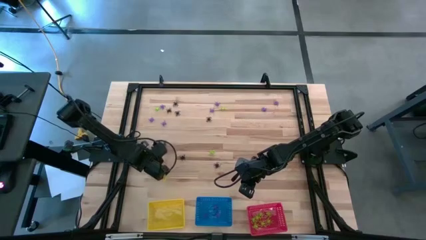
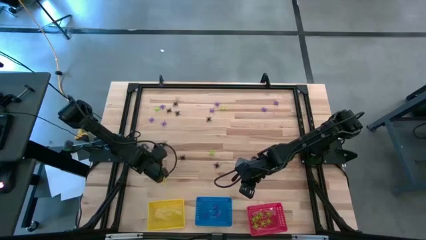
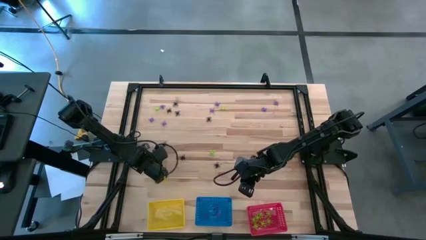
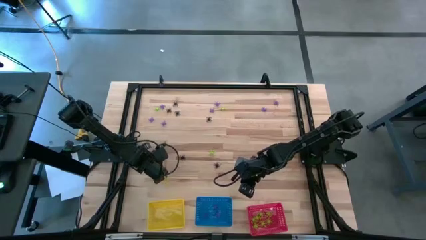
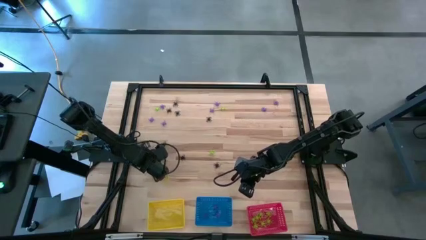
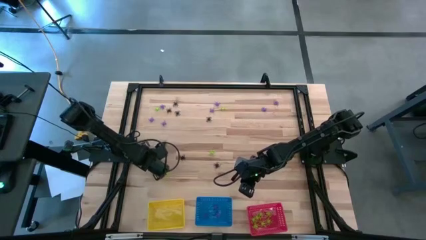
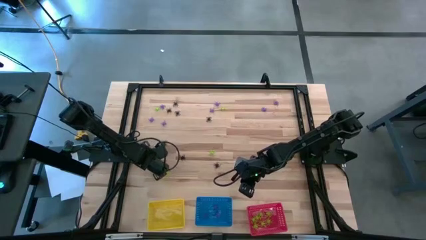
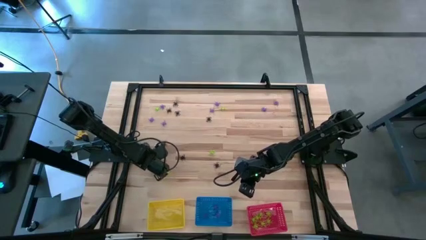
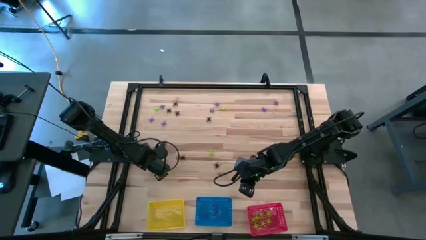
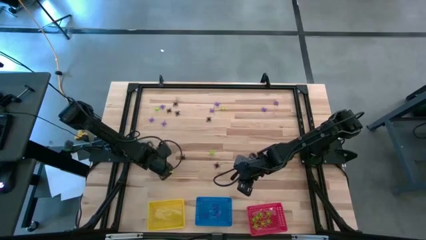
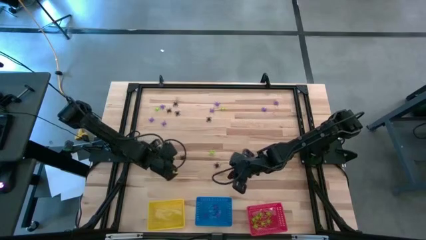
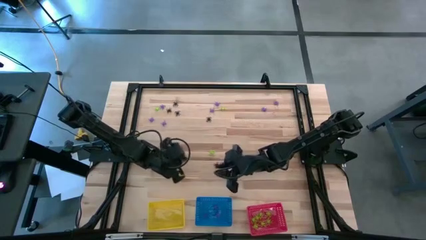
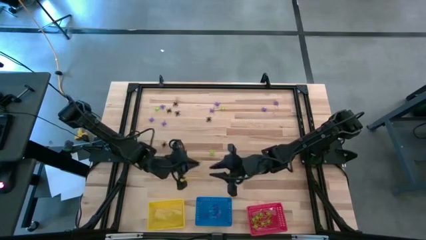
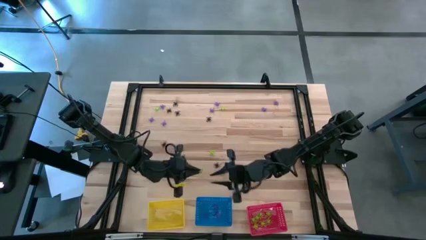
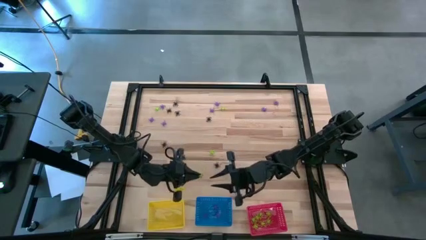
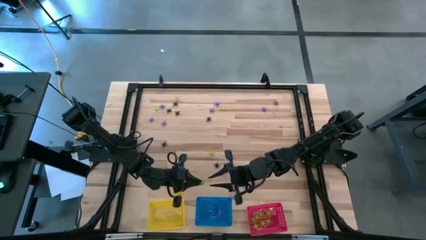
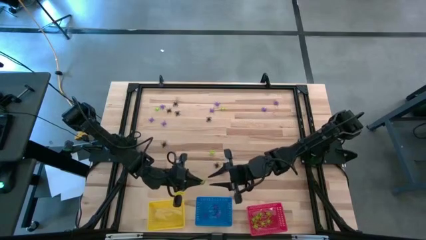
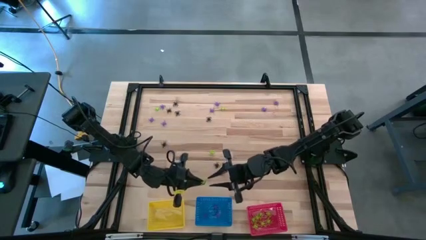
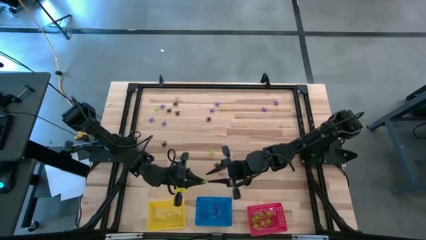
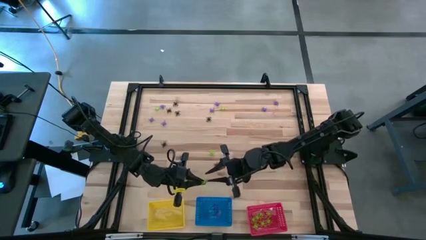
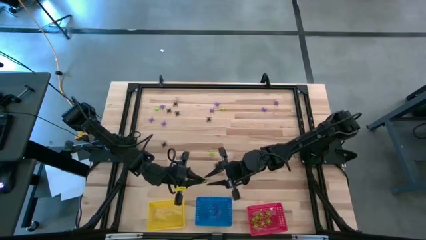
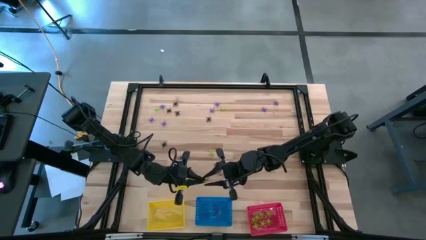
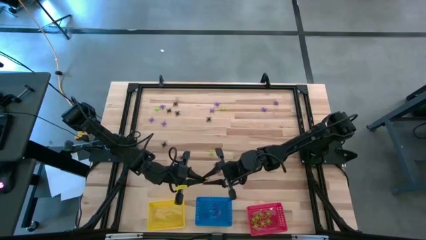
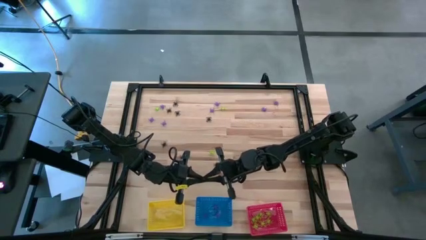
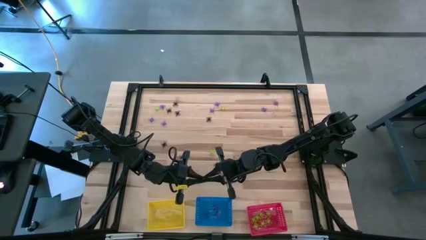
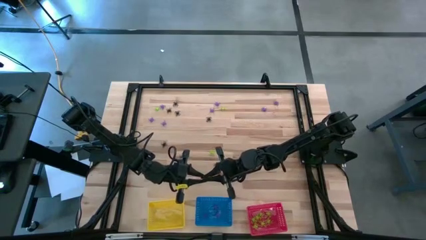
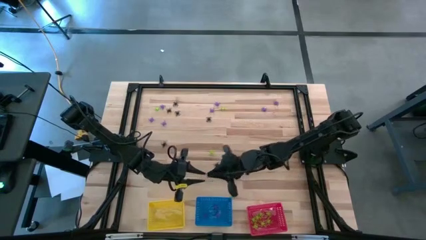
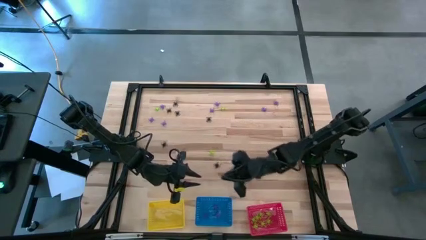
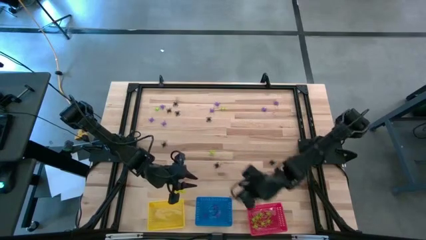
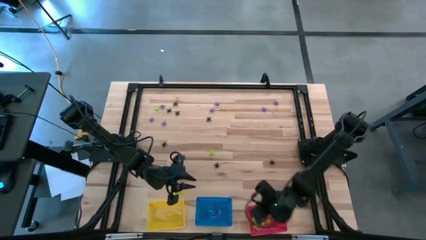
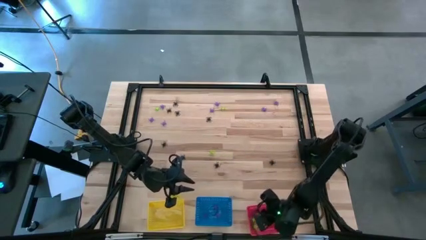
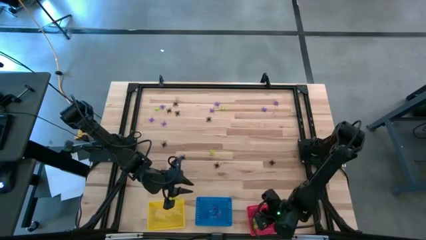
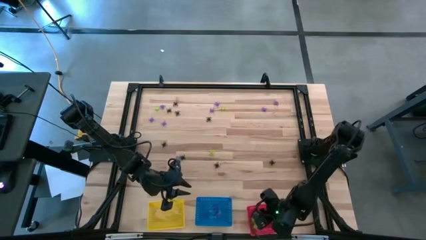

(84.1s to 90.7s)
Task: Sort Halloween decoration
Put the green spider toy into the red bin

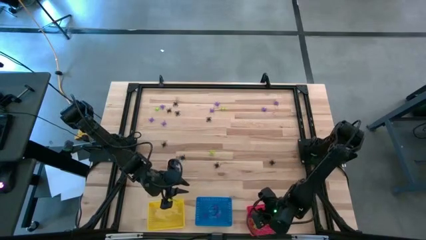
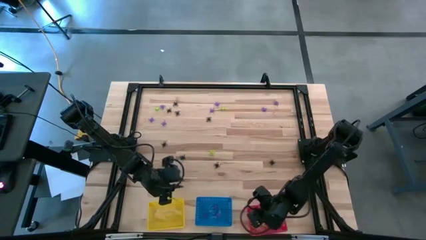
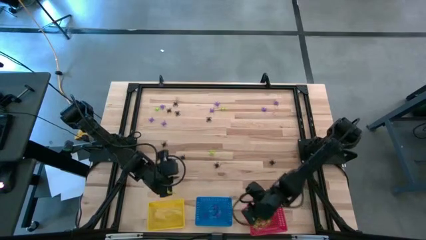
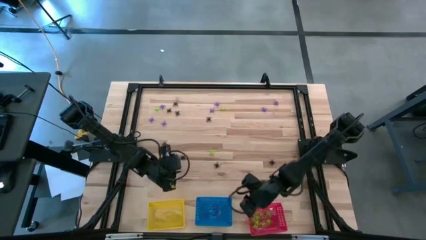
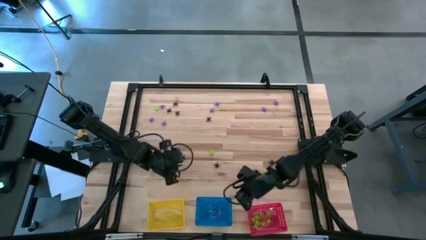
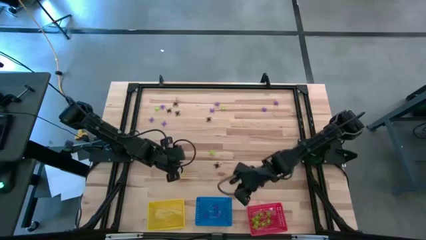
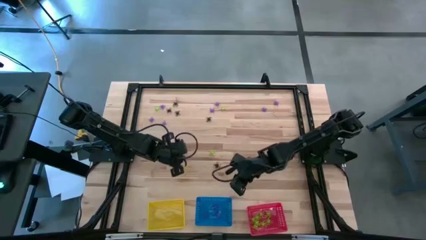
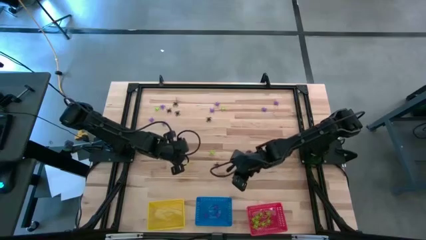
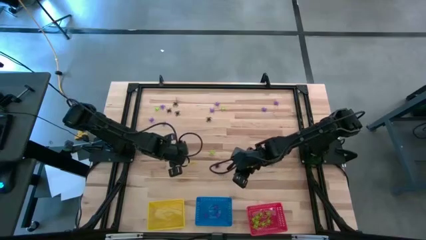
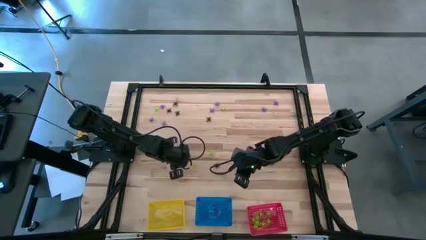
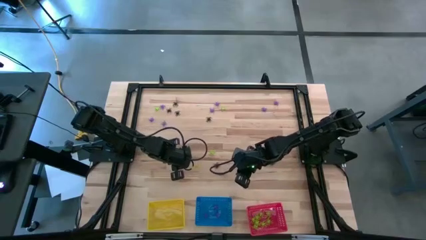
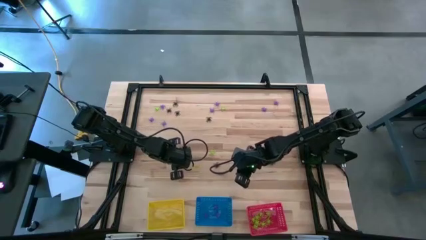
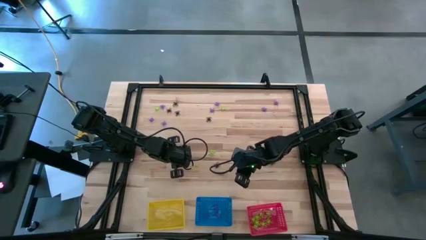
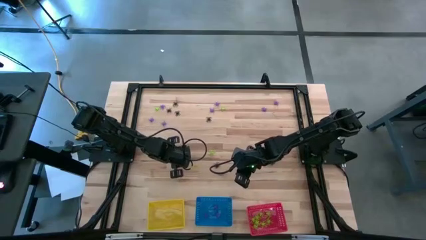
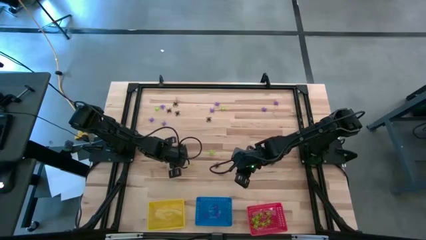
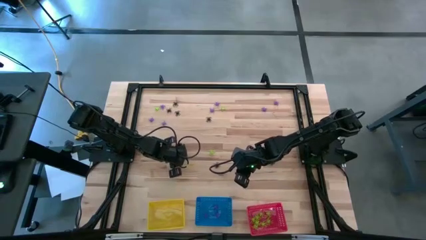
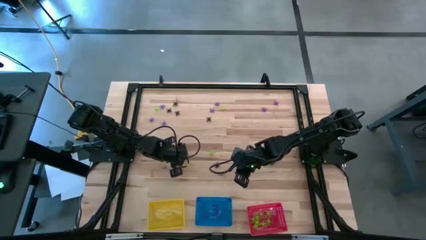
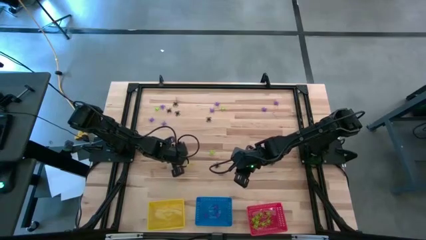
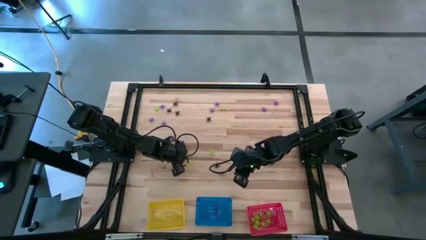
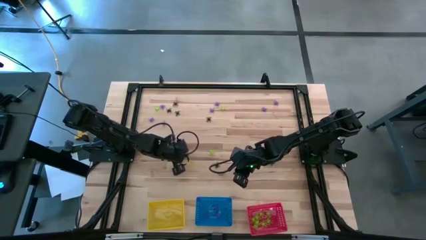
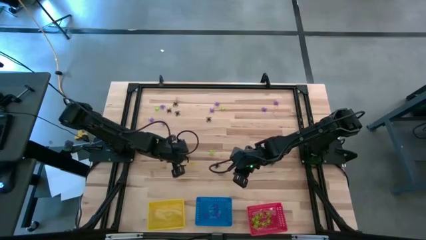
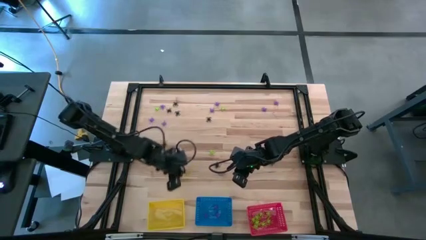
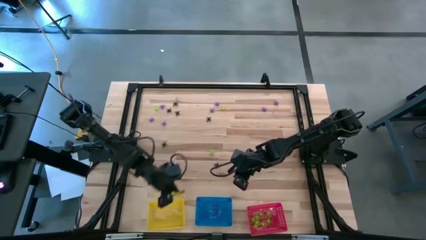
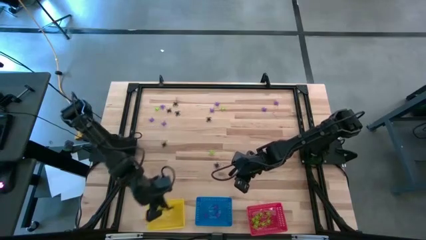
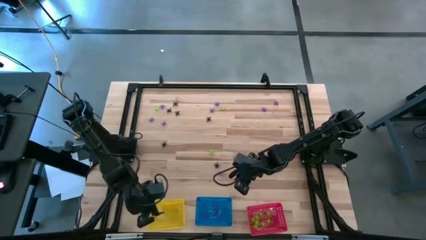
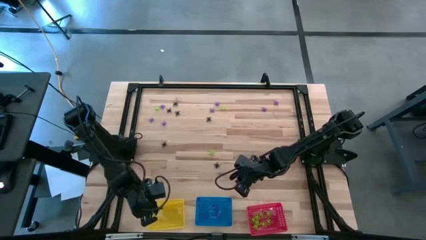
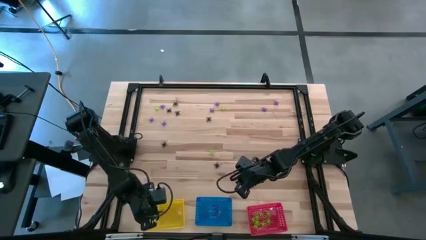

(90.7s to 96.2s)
Put the black spider toy into the yellow bin

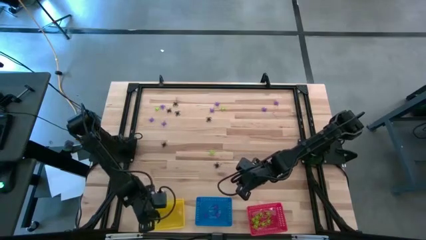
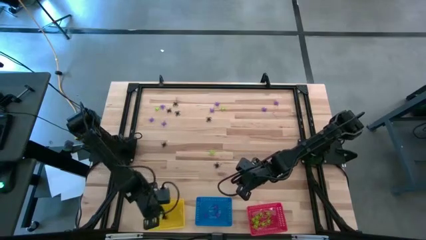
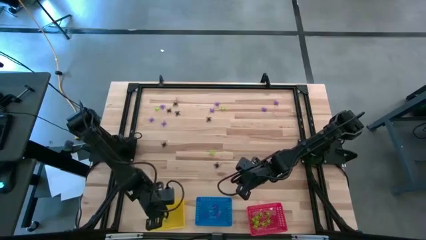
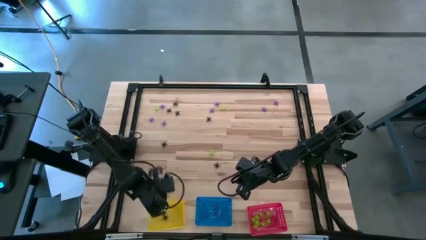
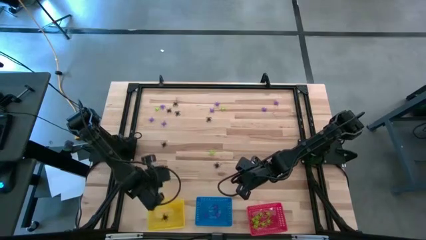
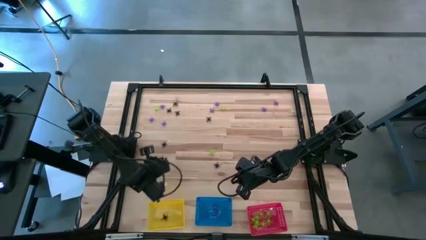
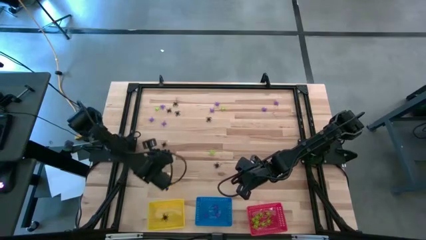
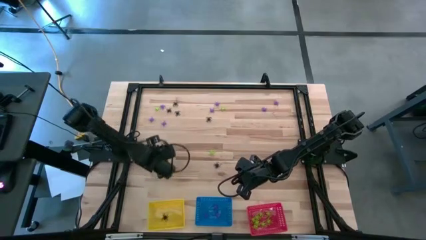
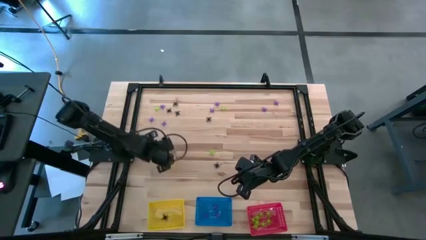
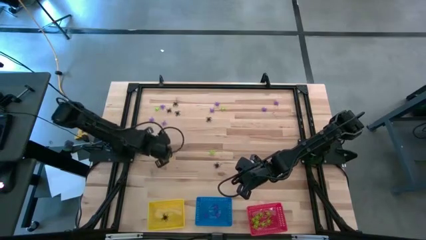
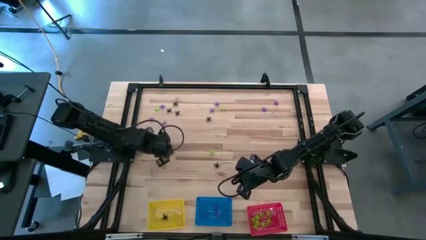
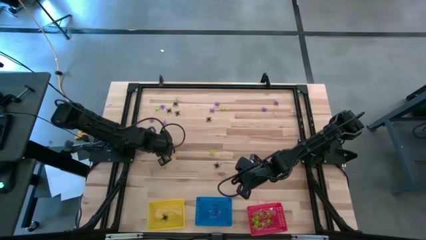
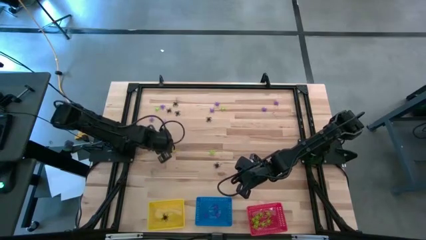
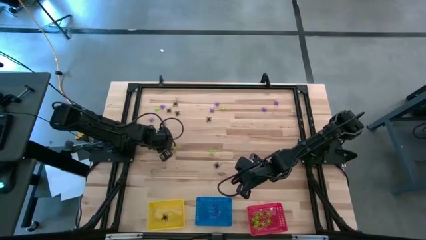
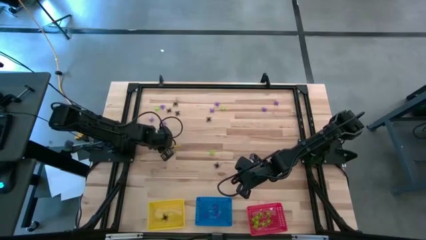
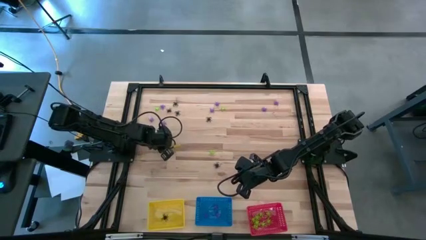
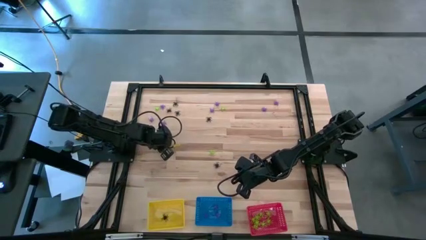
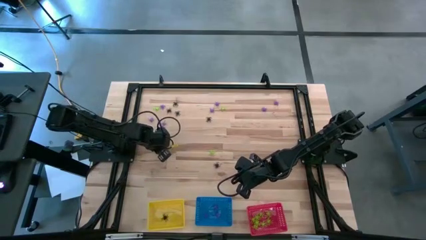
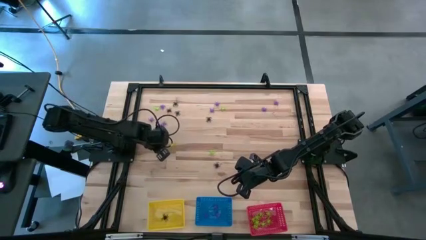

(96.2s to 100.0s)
Put the black spider toy into the yellow bin
